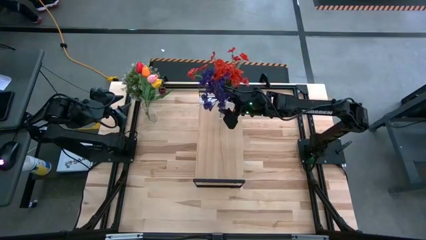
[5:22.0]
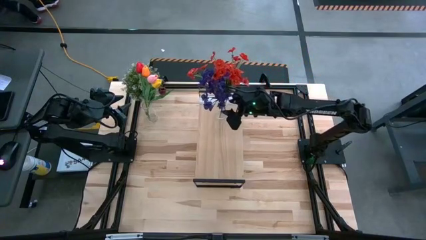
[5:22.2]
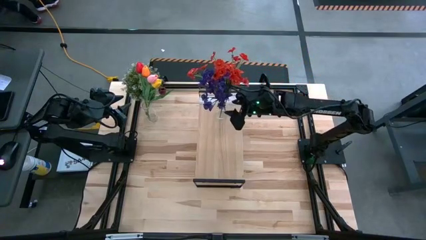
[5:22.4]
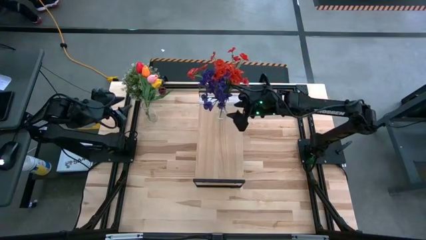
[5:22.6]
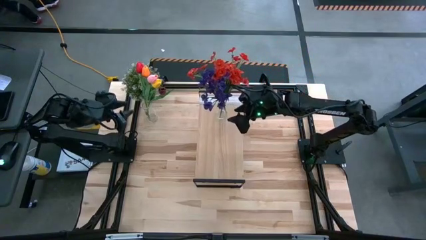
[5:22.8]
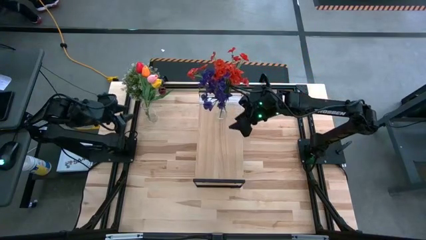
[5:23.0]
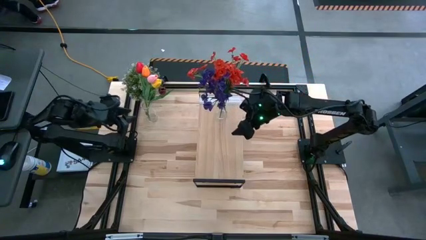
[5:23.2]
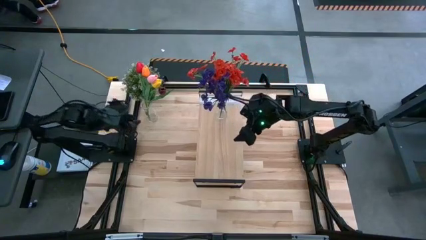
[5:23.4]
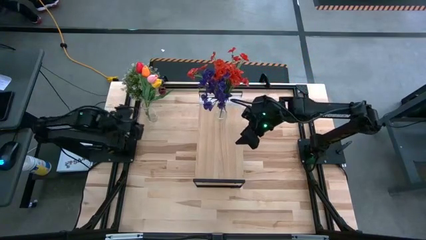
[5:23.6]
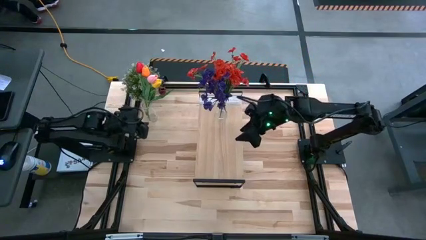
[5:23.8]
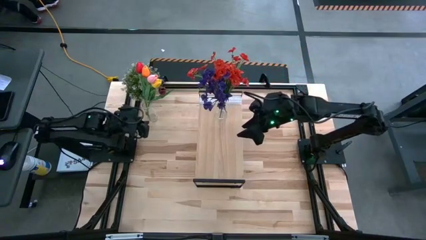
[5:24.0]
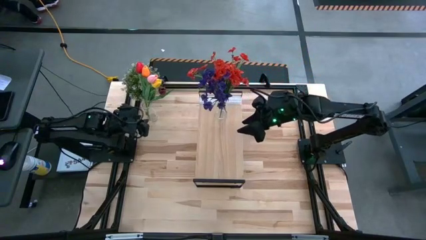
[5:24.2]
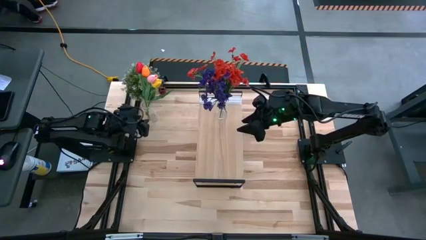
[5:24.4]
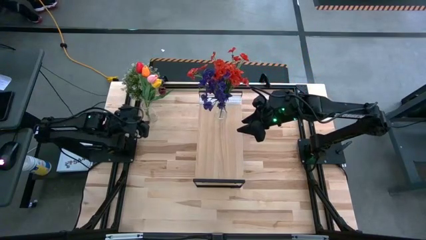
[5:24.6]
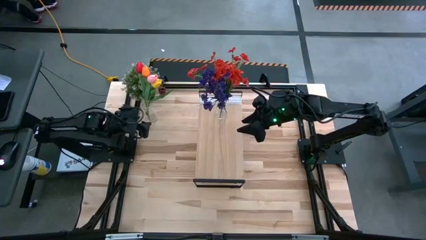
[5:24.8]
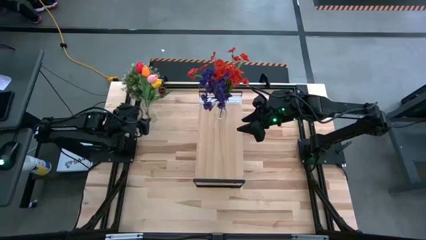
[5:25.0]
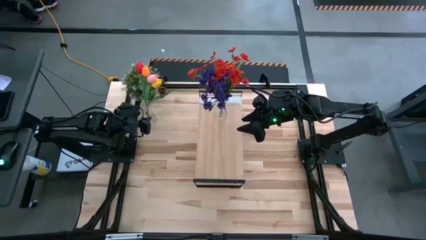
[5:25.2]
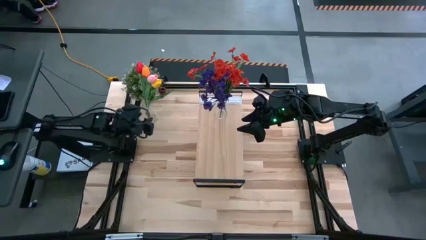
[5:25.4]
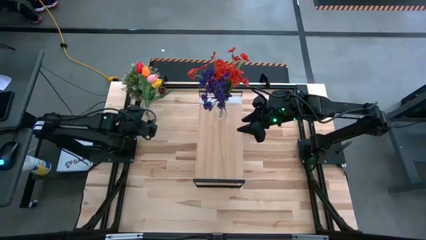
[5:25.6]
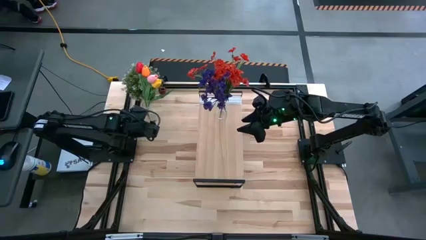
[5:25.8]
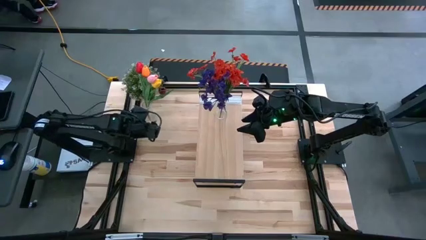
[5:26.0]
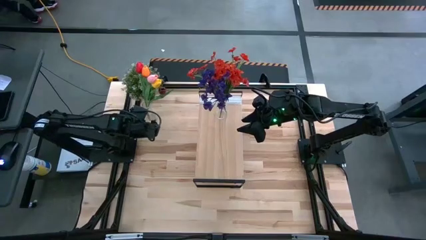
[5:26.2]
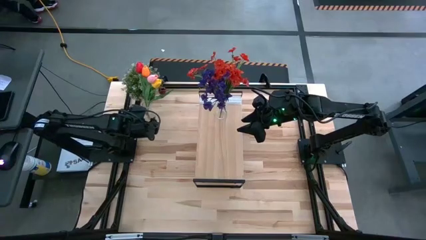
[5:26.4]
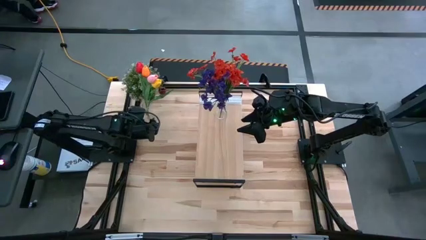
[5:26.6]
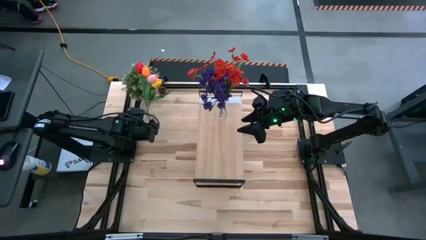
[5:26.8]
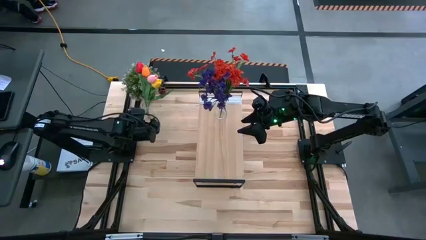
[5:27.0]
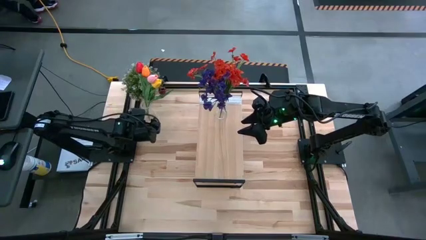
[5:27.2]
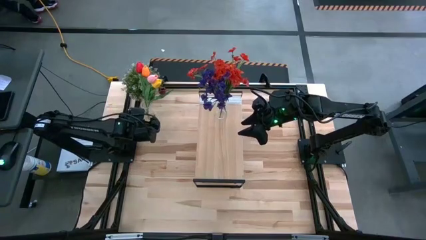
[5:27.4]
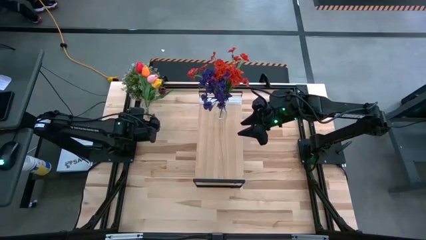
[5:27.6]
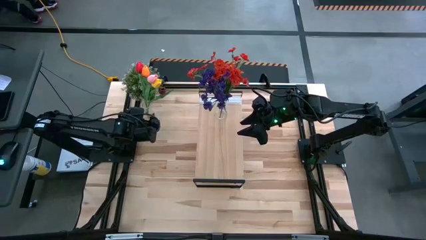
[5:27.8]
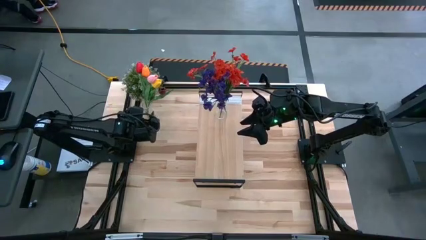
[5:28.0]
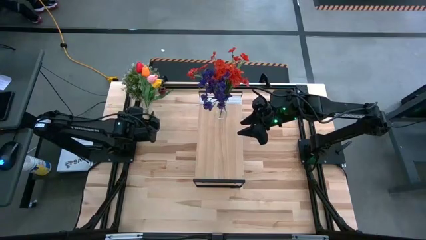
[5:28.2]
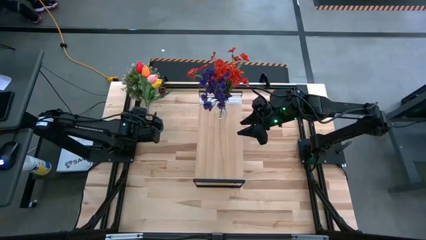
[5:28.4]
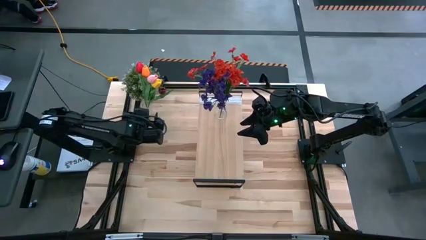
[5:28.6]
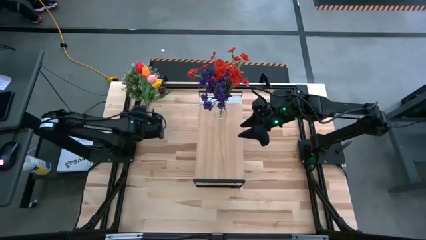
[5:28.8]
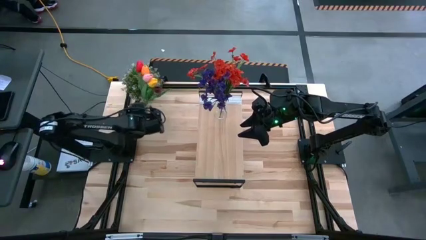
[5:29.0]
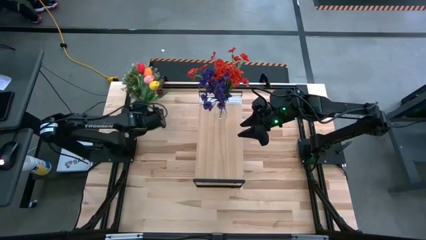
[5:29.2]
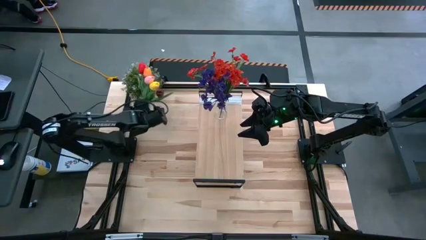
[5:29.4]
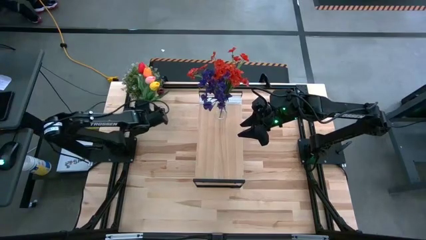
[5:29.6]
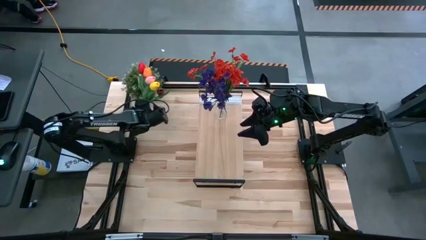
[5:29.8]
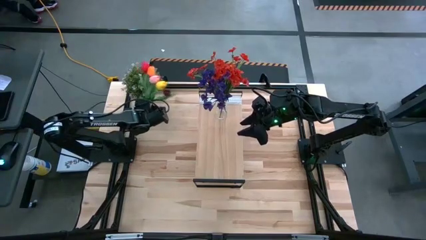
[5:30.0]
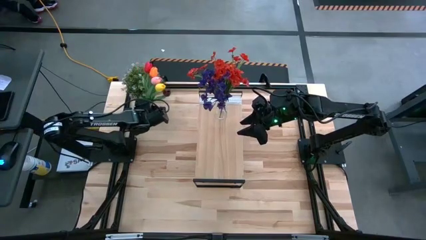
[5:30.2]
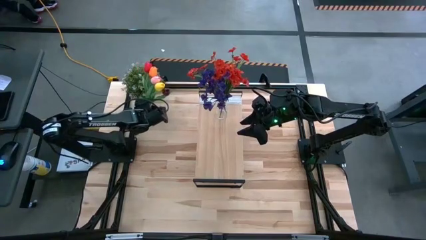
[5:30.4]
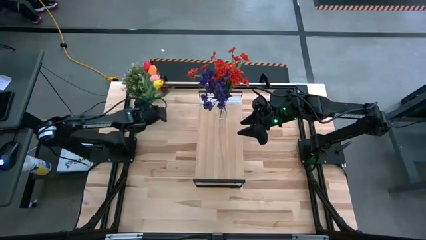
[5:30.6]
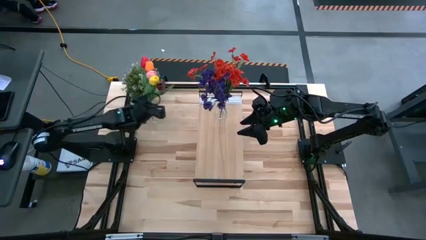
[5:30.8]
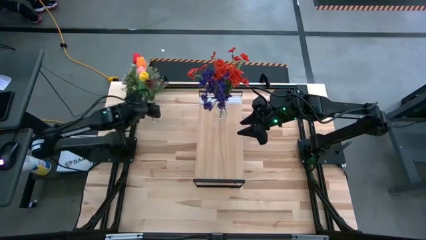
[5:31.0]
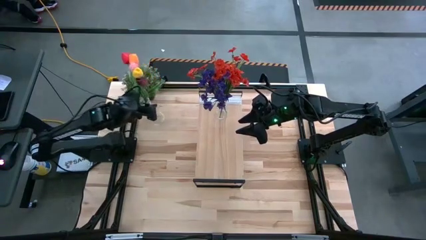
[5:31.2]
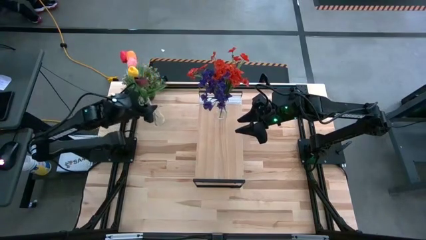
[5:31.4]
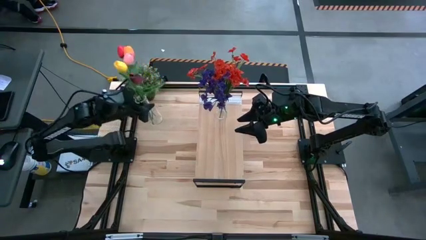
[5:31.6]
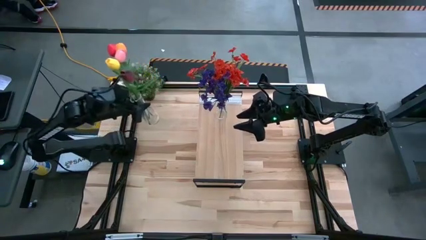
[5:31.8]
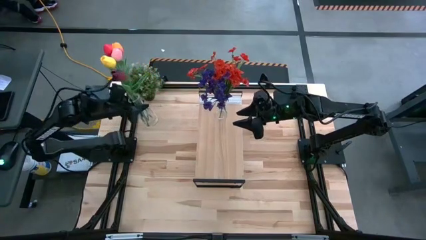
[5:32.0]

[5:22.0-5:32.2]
Task: Pick and place flowers into a vace then onto a shelf
Put the transparent vase on the shelf

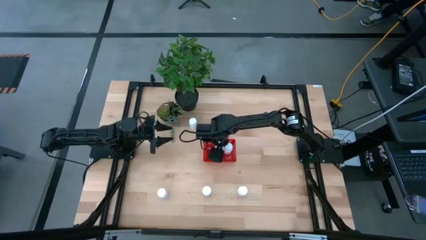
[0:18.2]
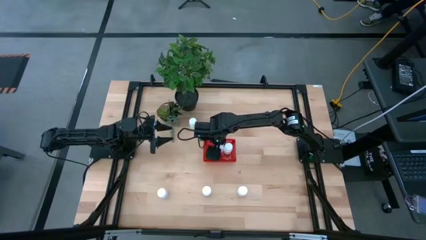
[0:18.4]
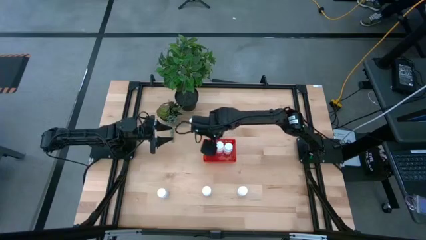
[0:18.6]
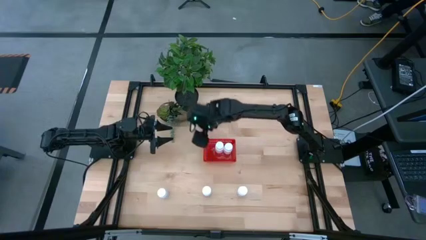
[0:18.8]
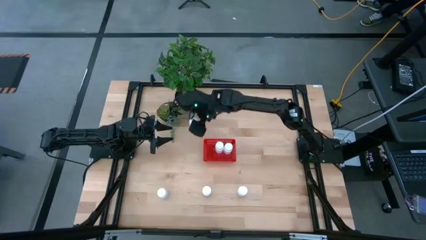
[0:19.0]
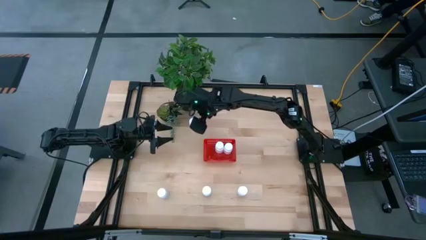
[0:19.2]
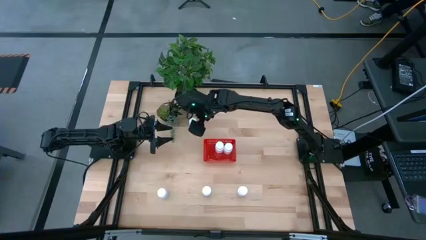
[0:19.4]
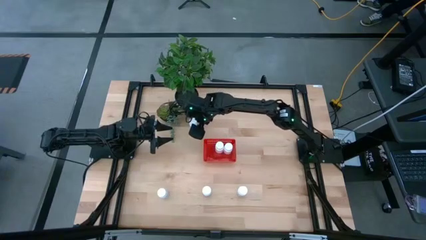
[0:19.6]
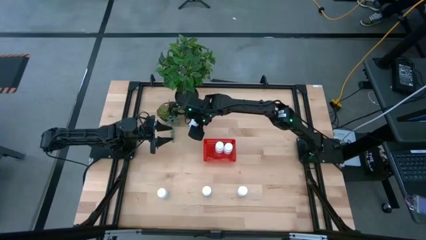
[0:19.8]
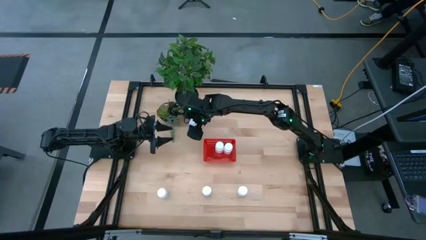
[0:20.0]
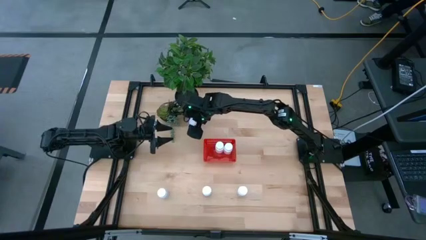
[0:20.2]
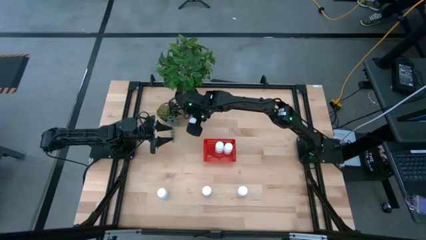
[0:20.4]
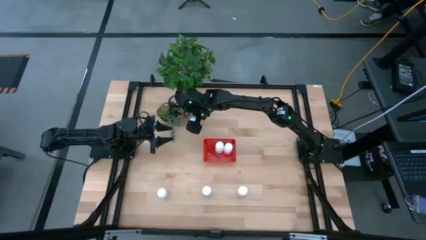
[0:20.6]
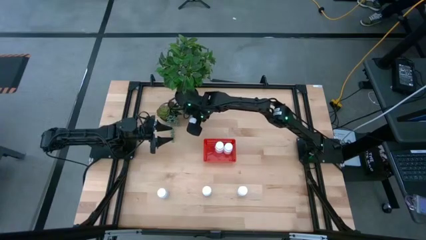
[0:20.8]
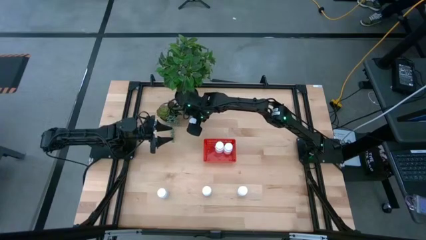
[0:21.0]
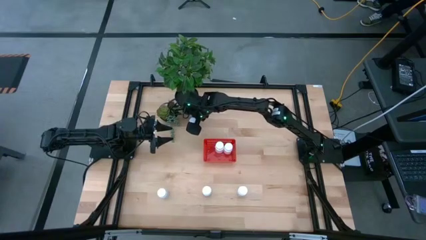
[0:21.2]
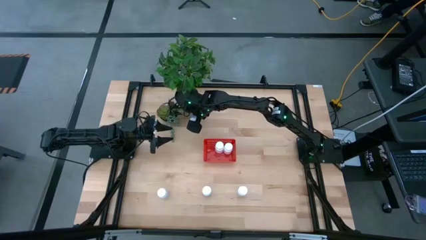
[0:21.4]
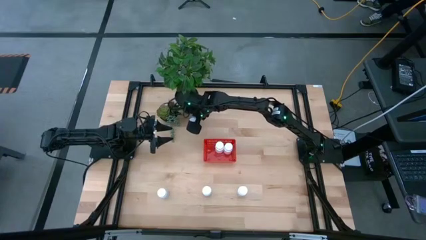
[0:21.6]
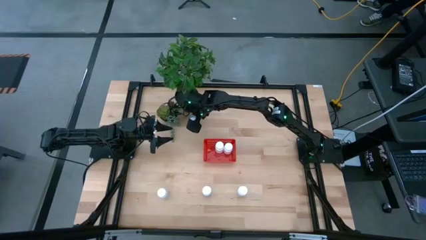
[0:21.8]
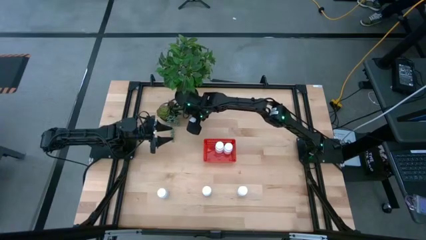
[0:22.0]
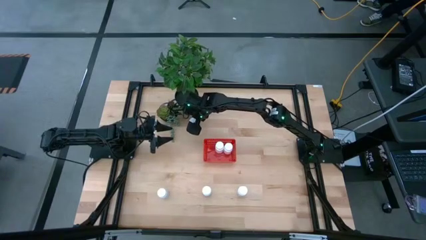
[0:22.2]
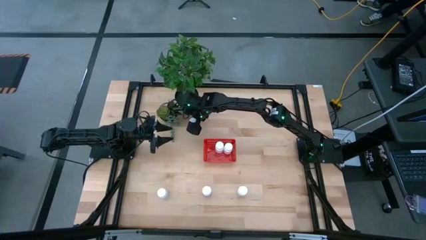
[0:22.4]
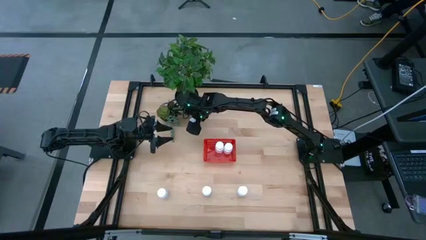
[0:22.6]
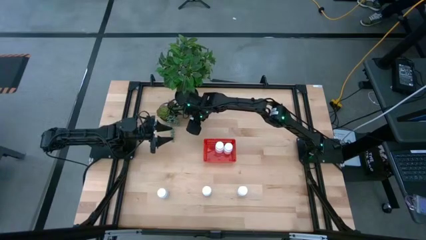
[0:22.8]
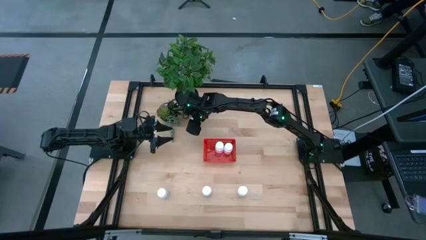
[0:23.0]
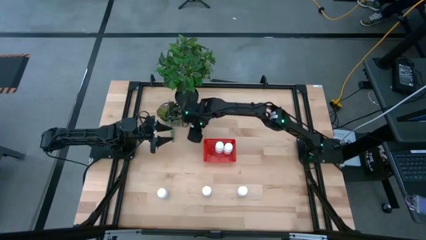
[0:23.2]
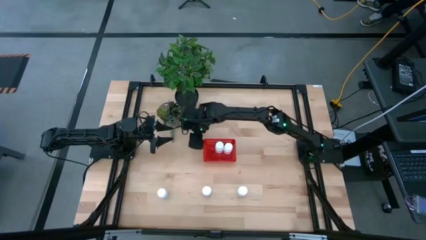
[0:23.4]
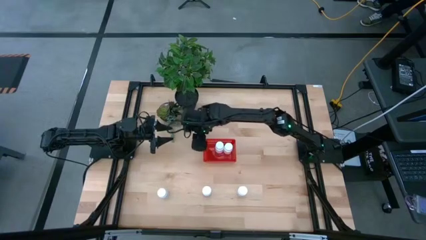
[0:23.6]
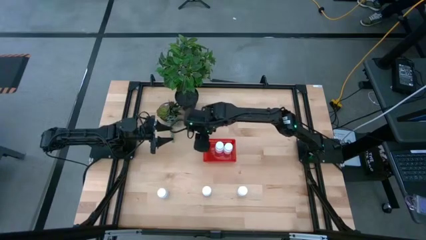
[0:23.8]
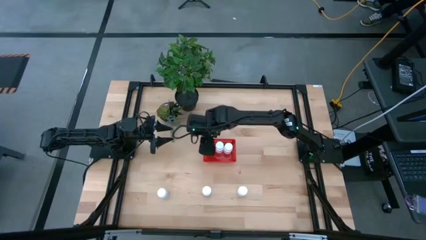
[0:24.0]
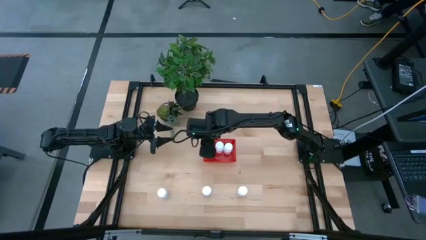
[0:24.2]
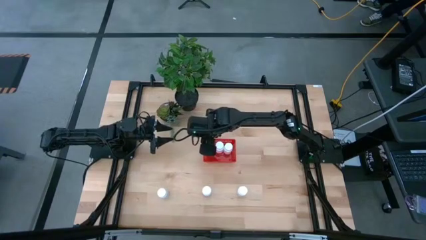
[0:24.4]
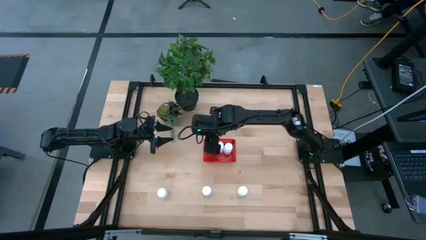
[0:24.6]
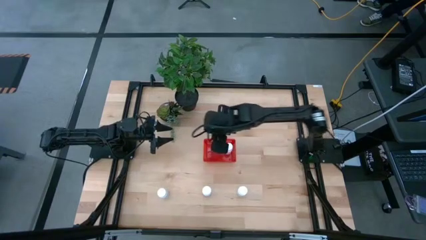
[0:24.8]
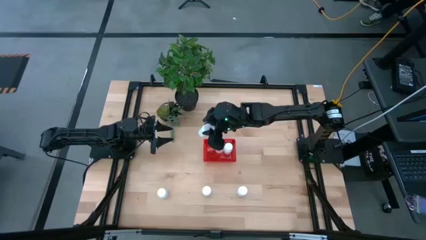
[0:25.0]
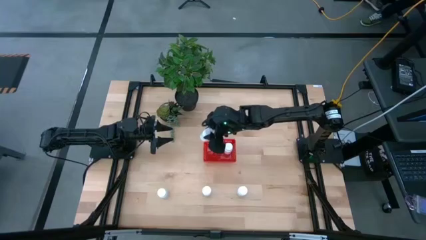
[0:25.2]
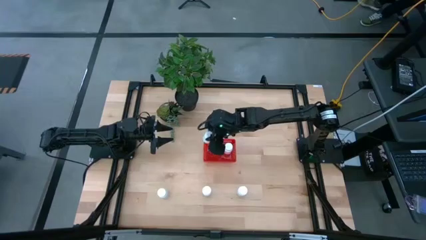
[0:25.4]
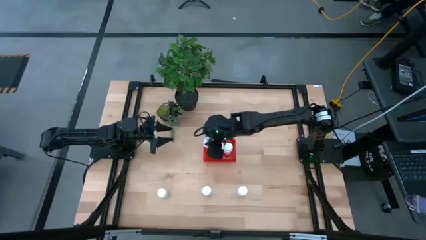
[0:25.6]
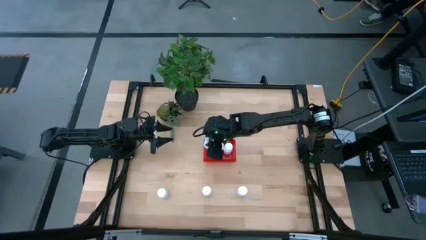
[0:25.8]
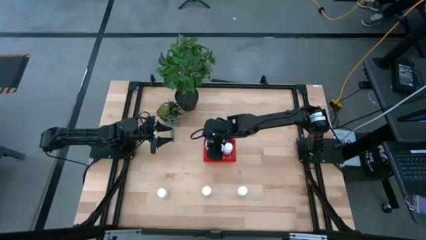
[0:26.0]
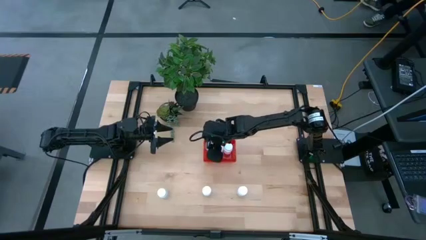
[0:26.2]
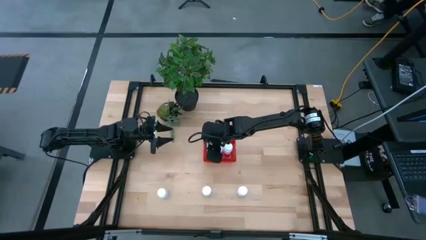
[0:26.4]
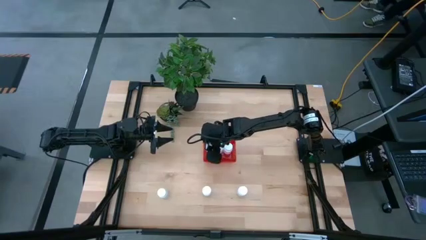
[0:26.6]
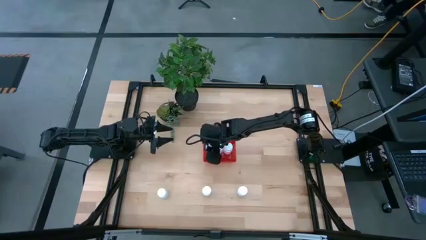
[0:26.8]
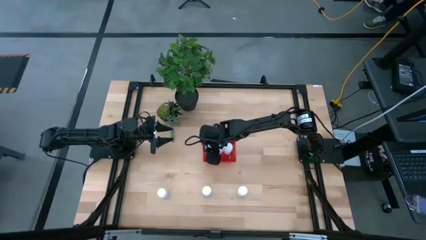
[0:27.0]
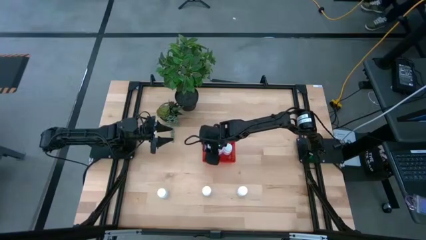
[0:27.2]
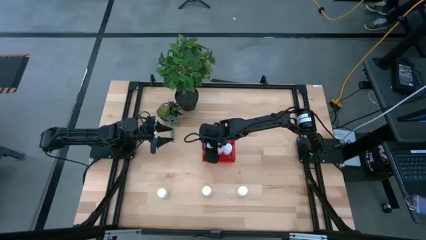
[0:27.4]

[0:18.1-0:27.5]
Task: Pick and place pill bottles into a basket
Put the white pill bottle into the red bin
